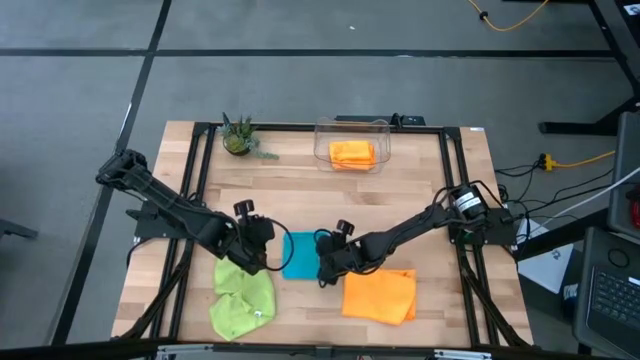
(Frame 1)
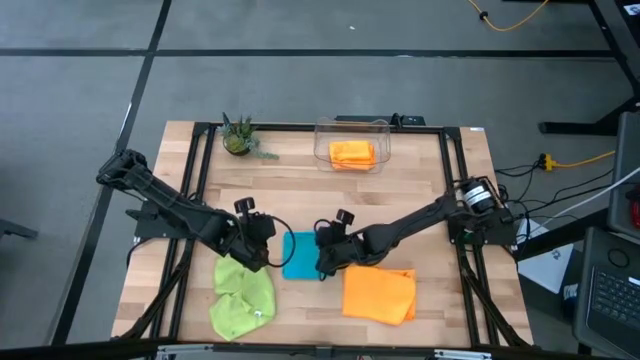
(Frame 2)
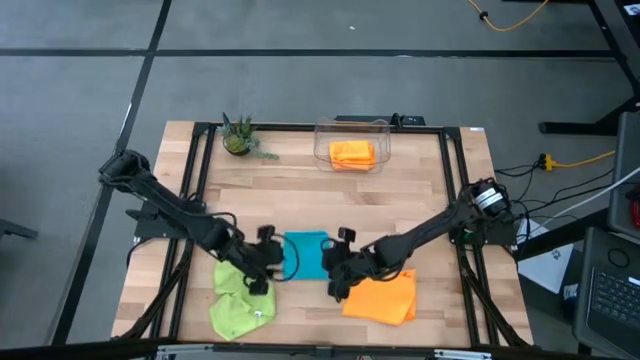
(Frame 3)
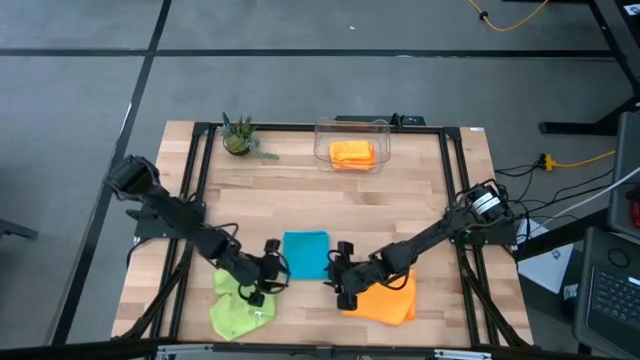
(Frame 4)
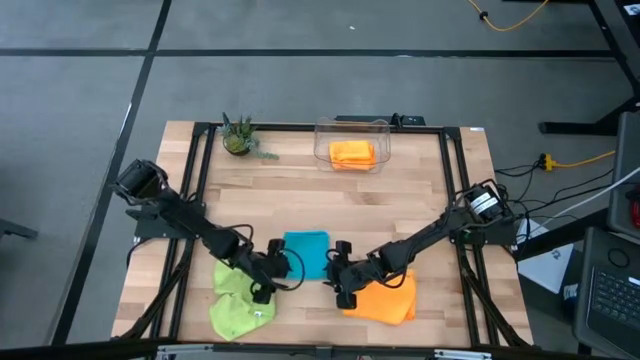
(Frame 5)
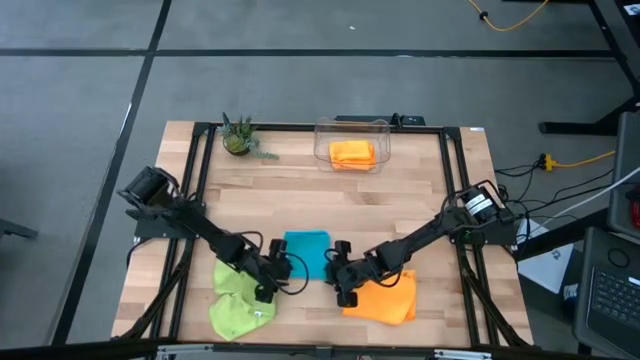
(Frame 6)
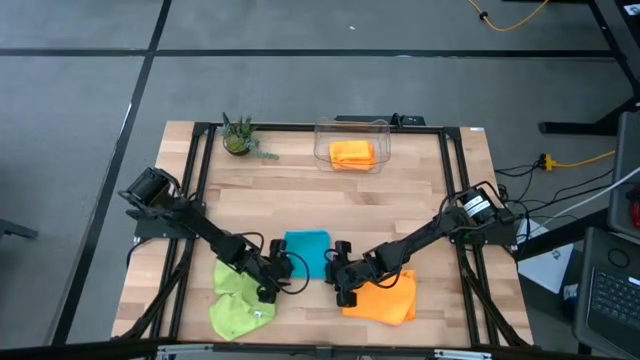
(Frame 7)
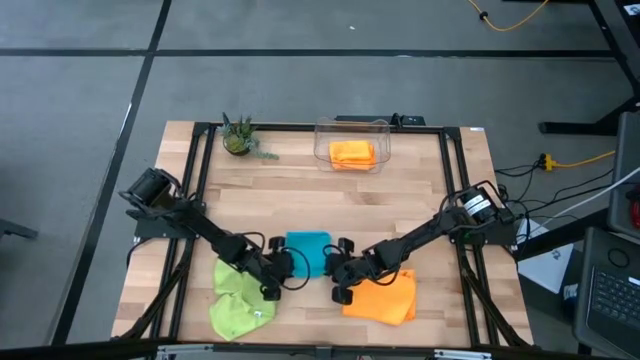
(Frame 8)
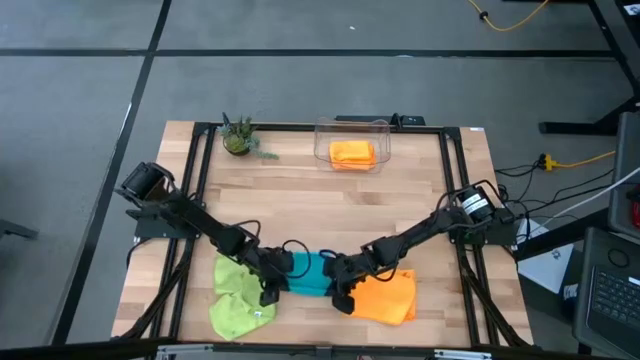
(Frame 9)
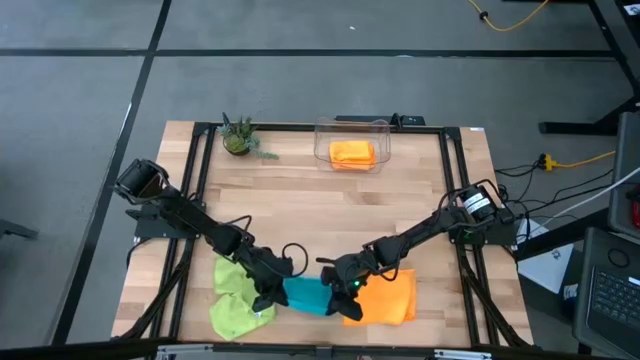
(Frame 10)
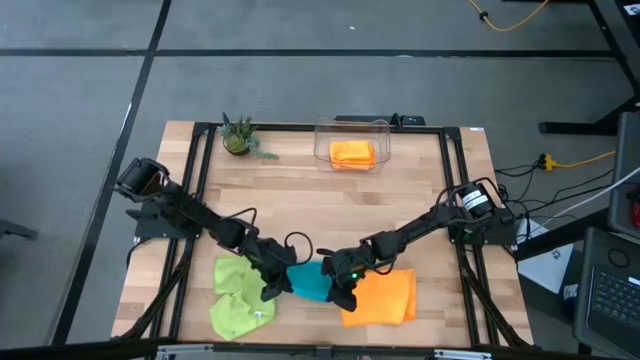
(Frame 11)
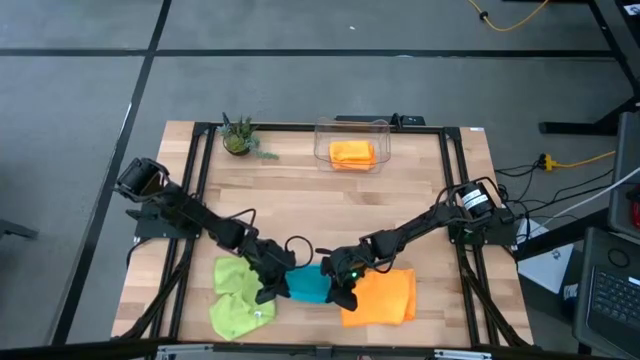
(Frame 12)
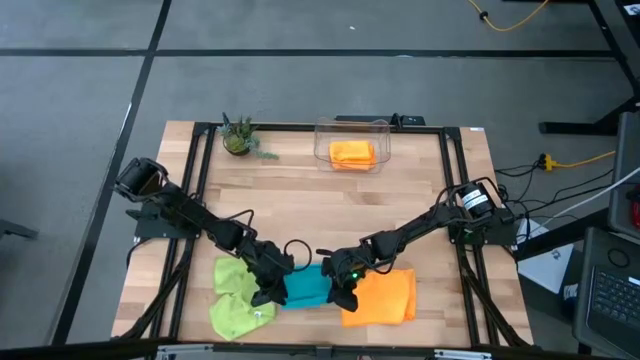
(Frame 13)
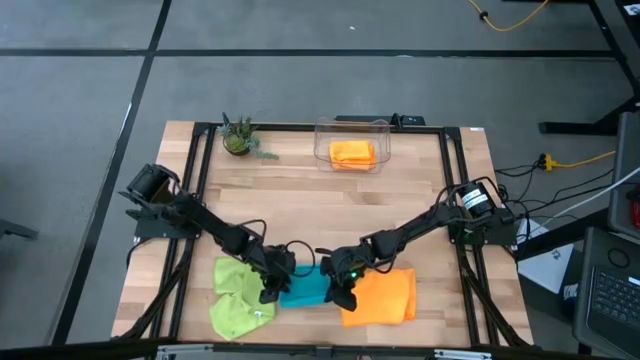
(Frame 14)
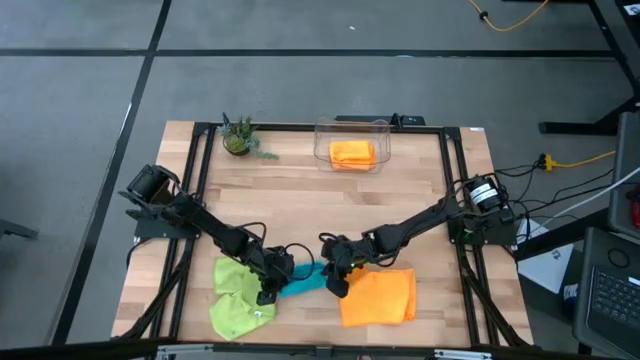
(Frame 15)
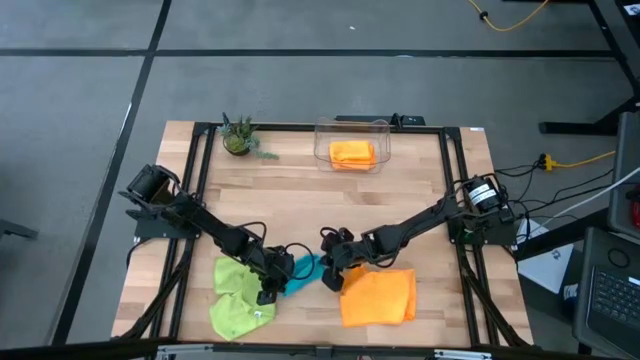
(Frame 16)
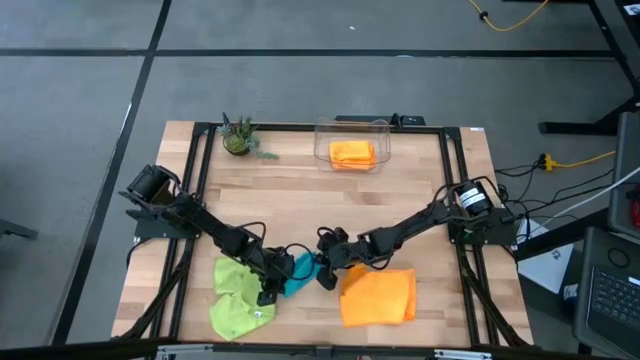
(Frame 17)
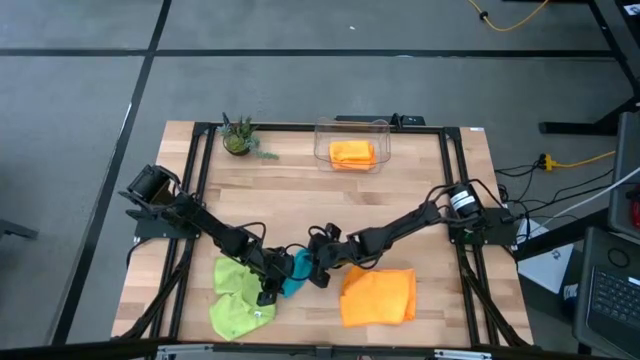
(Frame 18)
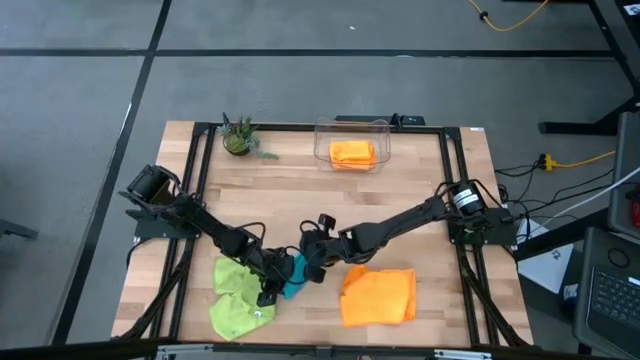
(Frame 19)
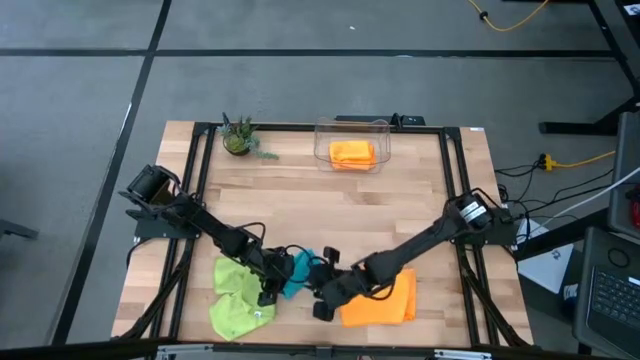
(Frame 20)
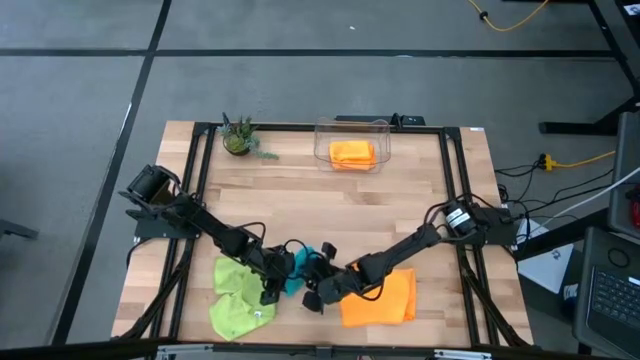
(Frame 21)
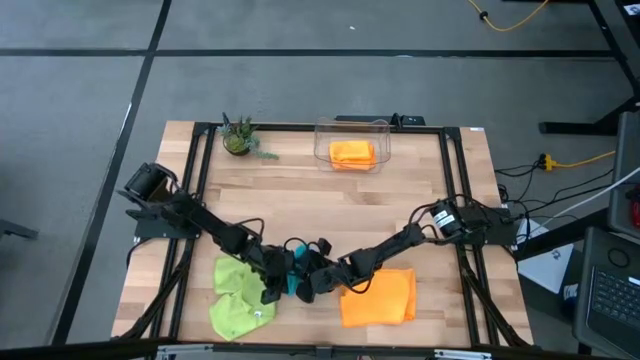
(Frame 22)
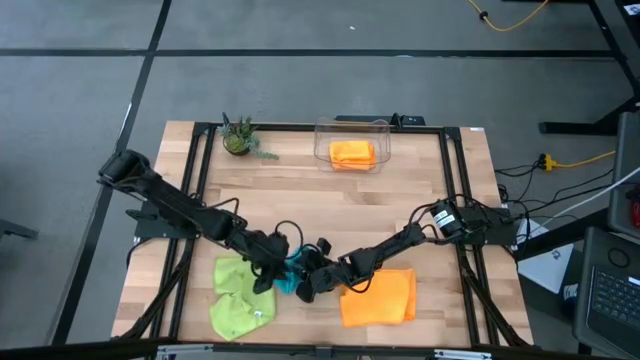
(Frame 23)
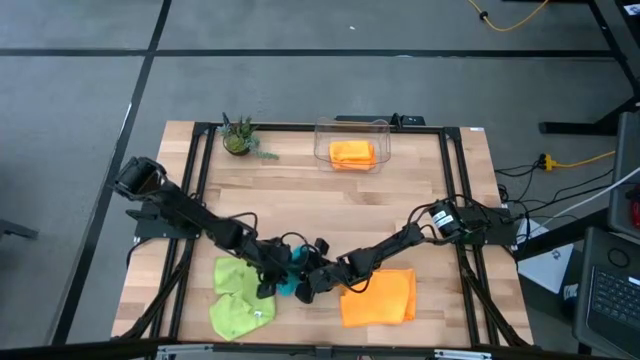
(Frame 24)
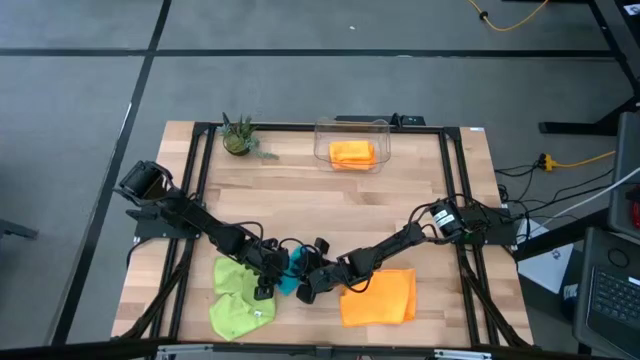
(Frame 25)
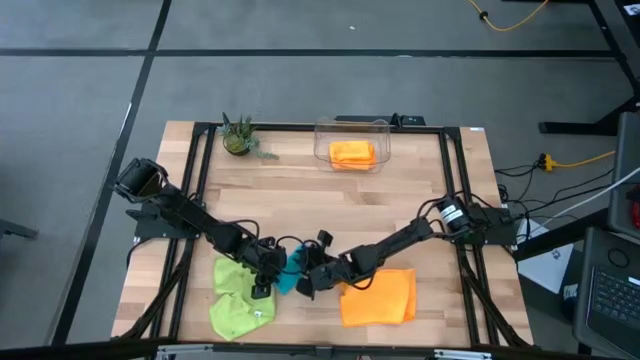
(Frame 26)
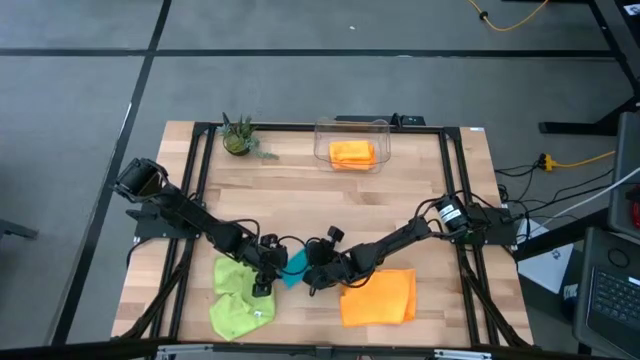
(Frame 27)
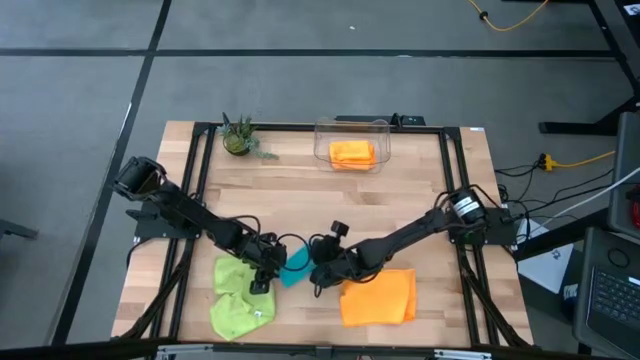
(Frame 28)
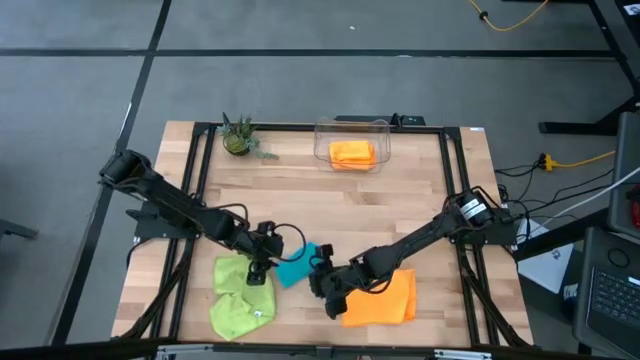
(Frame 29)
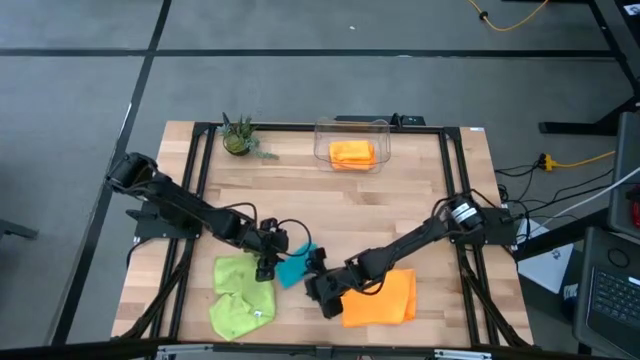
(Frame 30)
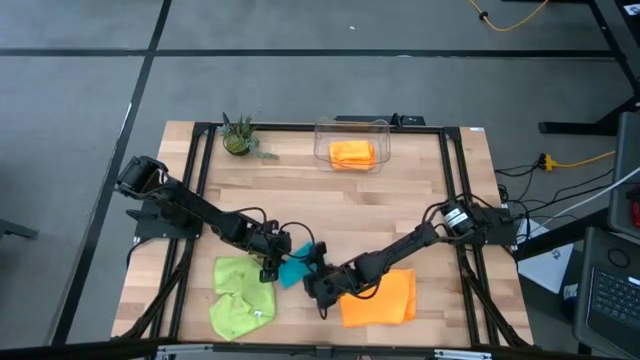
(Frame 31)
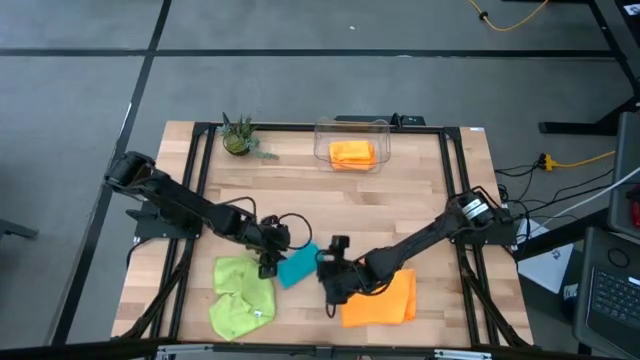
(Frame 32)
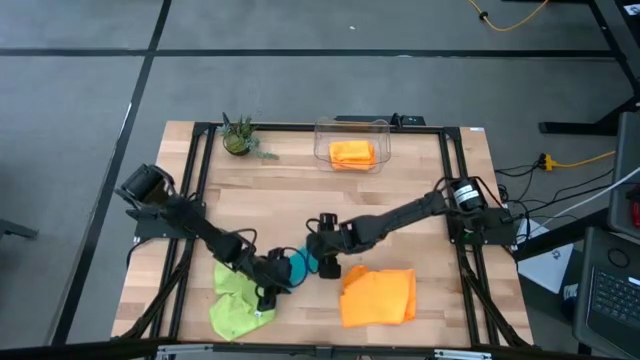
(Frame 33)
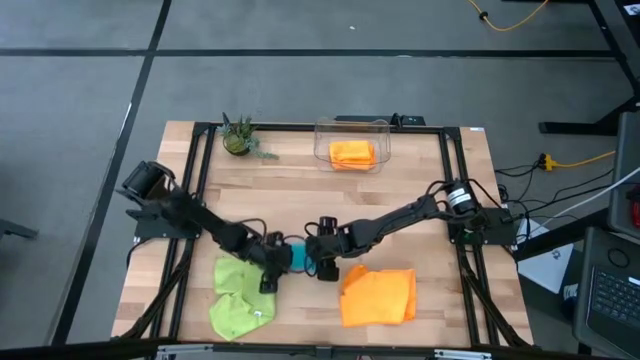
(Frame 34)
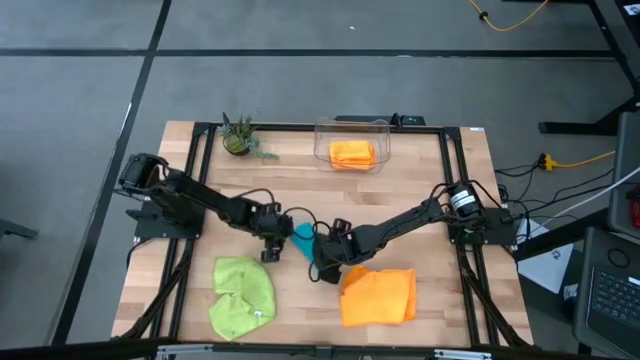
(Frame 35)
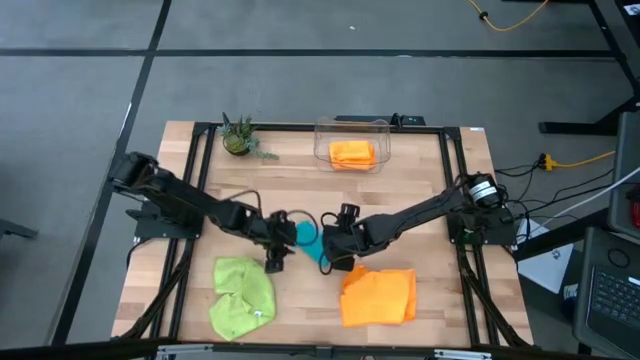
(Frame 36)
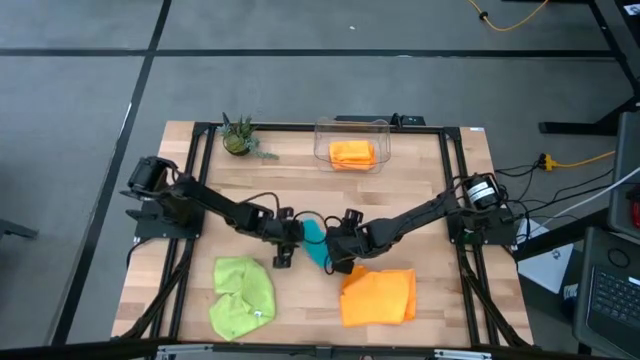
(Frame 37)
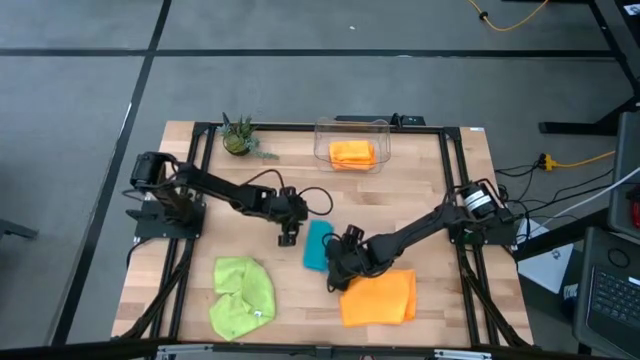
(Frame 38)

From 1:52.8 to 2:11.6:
Task: Fold microfiber towels
Fold the blue towel on the table

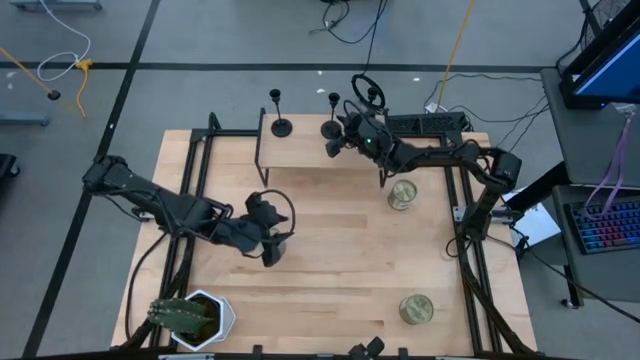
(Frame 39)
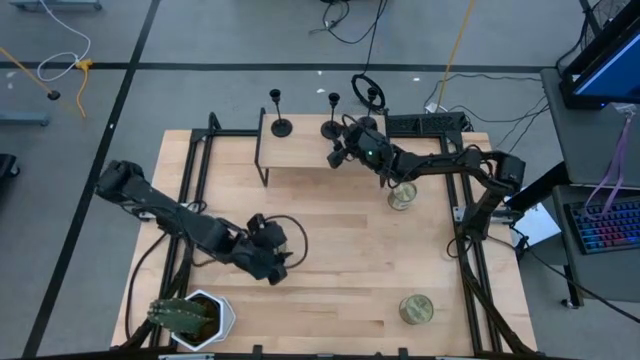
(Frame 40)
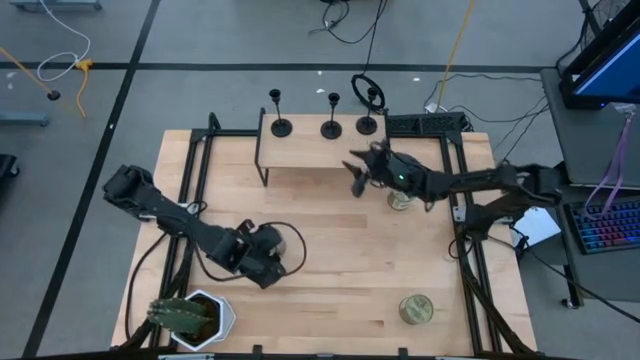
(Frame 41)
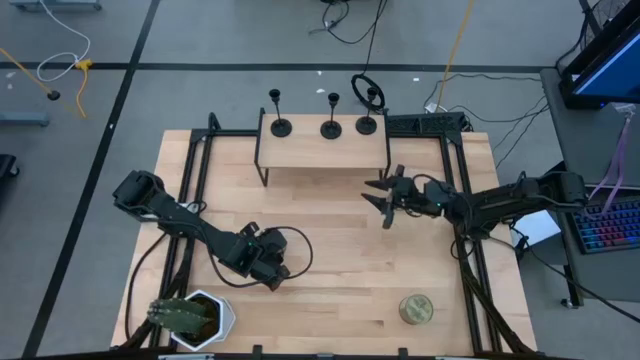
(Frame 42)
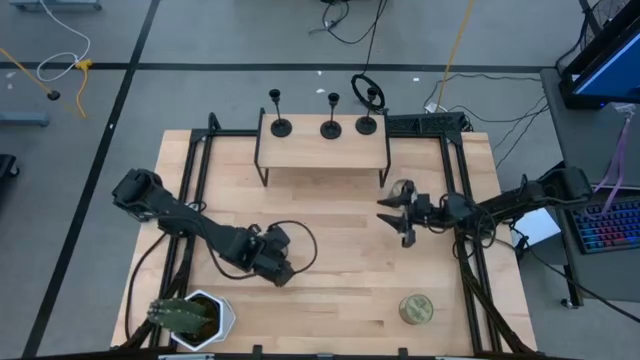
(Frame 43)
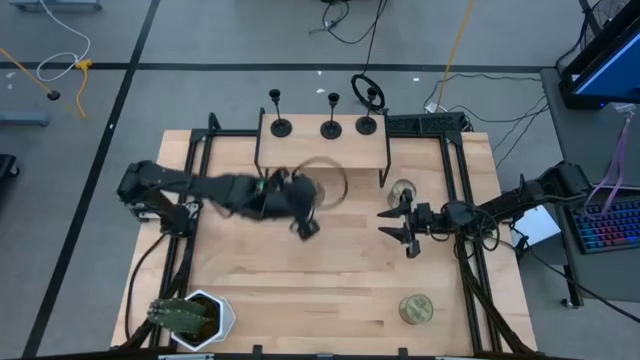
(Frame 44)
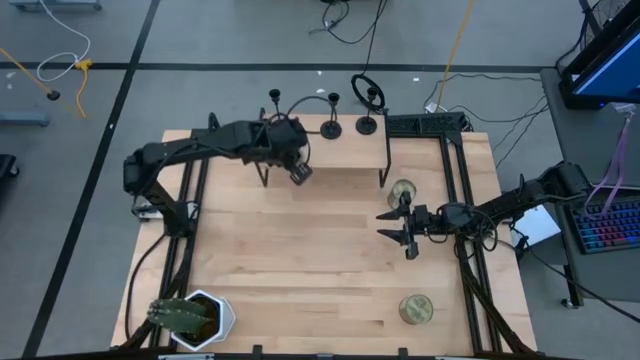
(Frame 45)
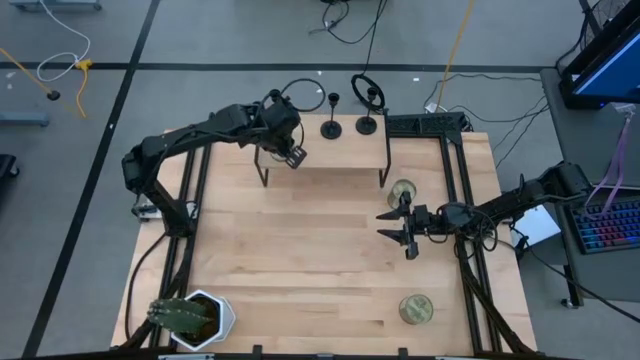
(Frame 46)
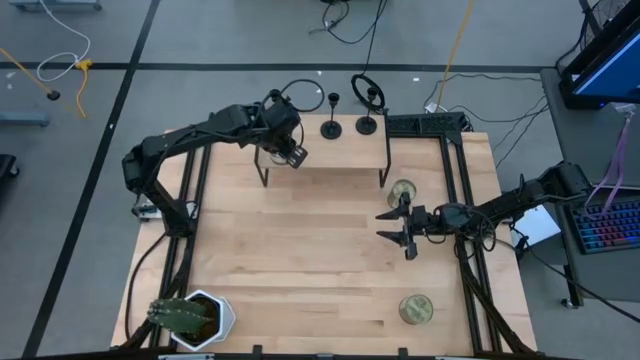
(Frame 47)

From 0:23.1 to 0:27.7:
Task: Pick & Place candle stick holders
Put the middle scented candle on the shelf
